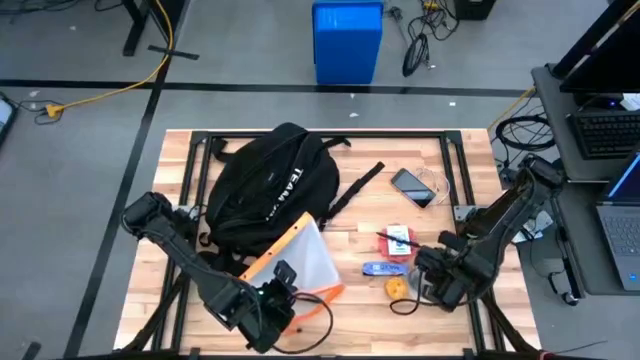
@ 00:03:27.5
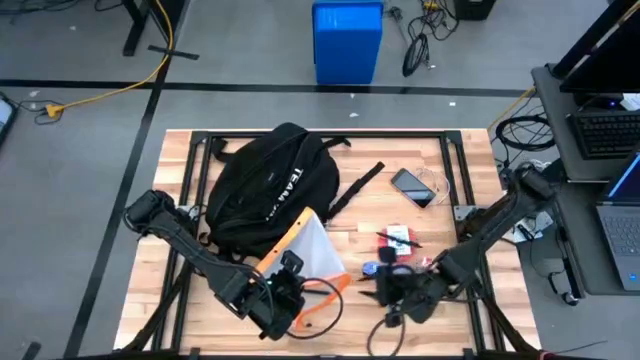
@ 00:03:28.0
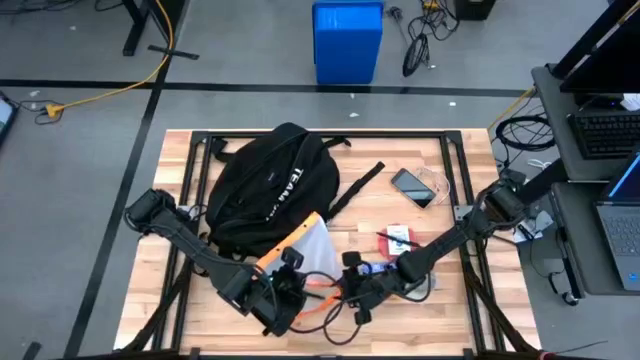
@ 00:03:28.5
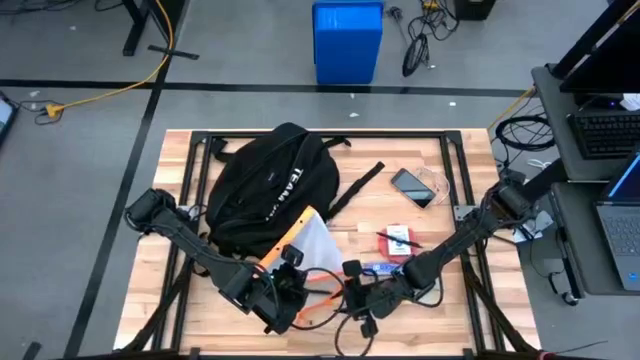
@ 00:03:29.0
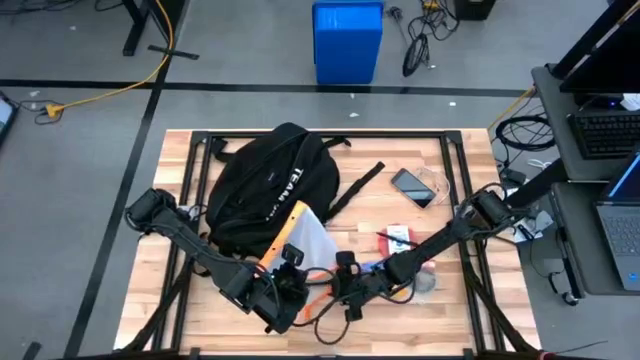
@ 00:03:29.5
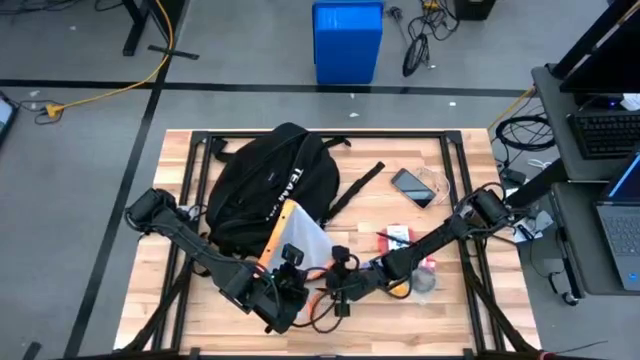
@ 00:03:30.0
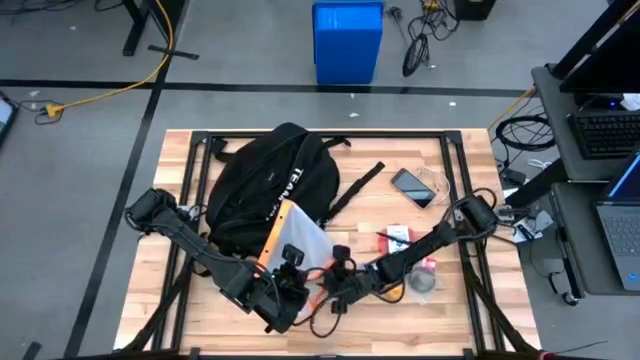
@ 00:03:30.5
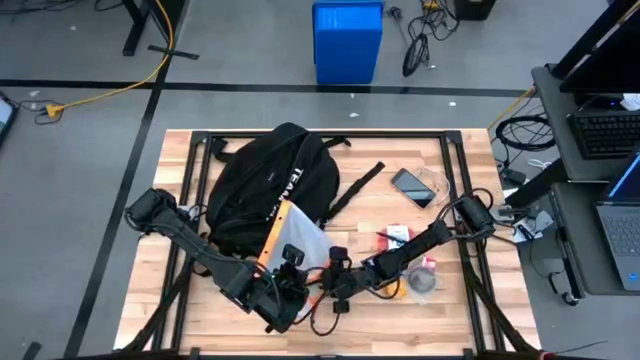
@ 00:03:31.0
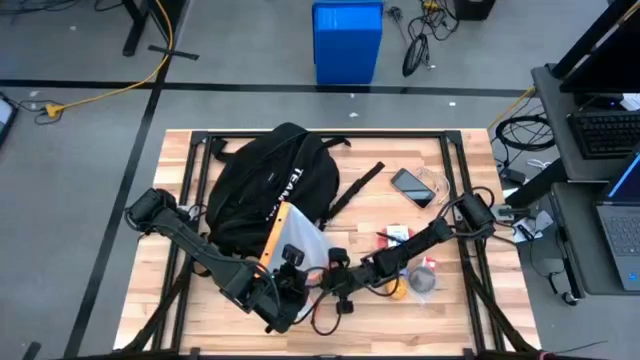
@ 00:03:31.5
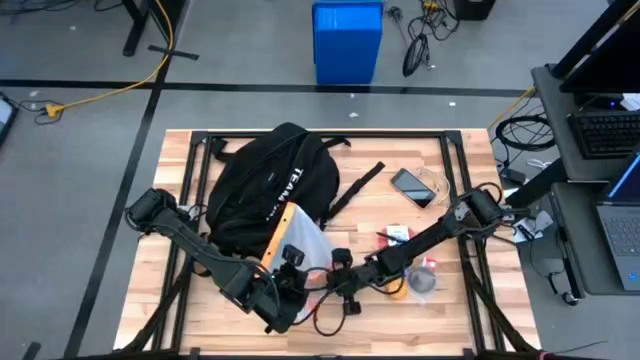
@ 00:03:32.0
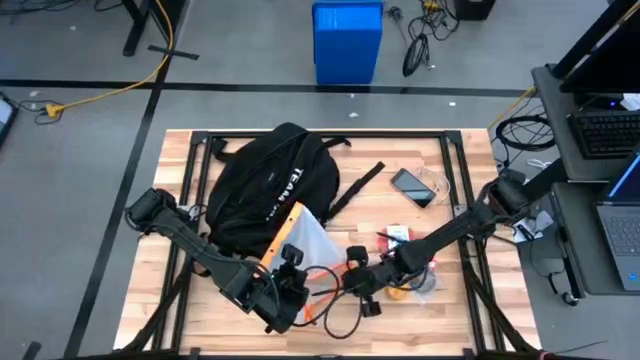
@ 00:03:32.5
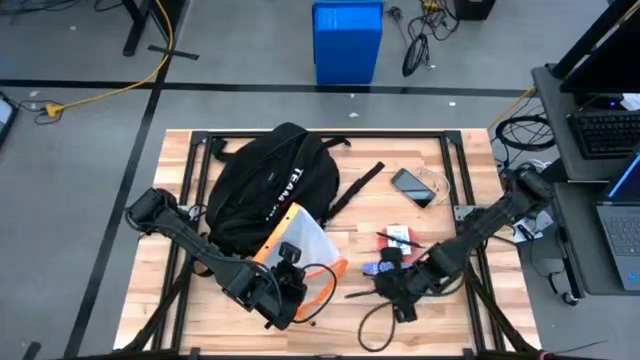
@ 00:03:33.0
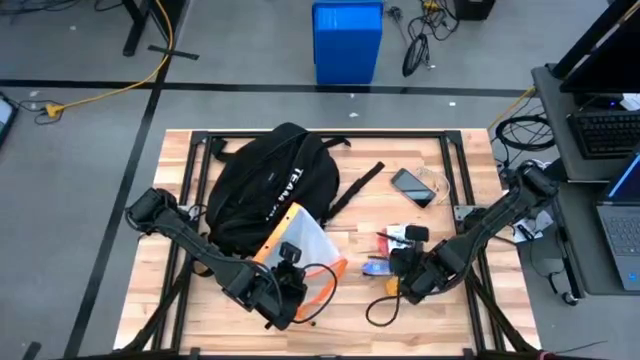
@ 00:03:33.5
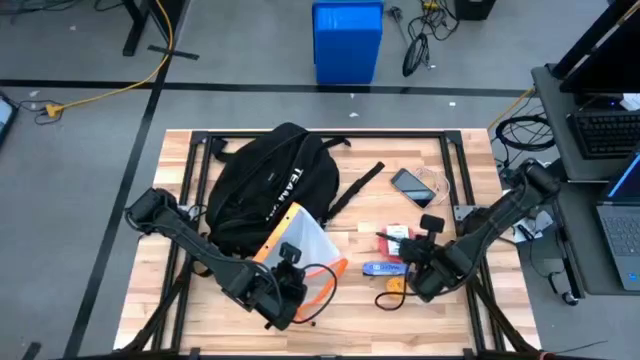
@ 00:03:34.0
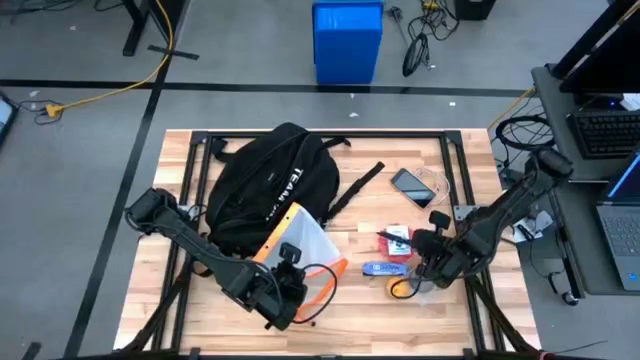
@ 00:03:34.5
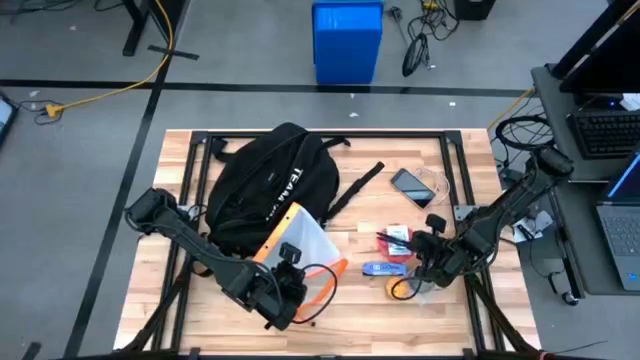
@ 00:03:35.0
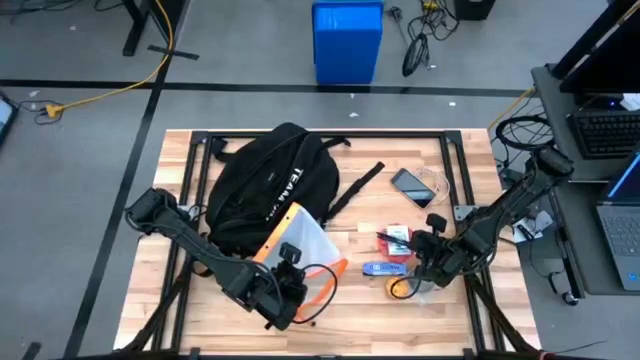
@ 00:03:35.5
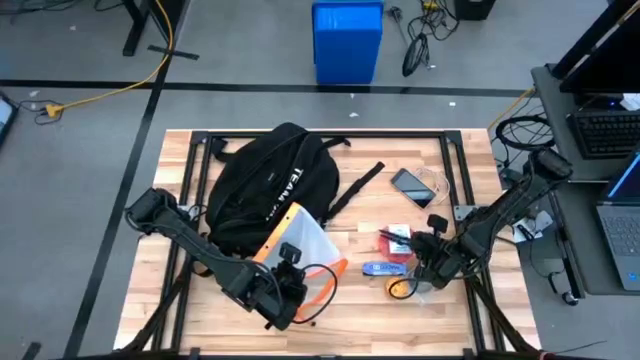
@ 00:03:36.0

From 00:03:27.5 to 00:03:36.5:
Task: Unpack backpack
Remove the black pen from the orange zip bag

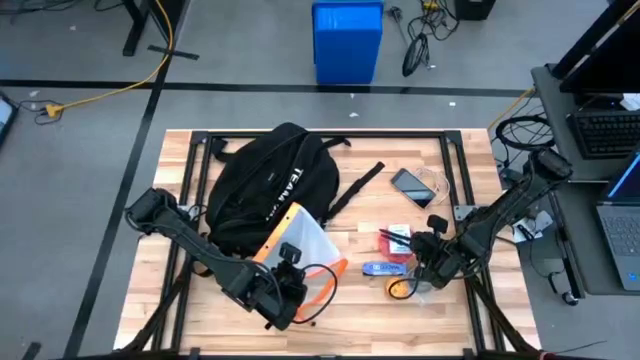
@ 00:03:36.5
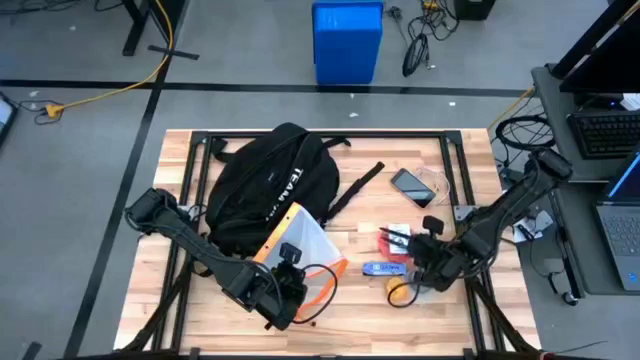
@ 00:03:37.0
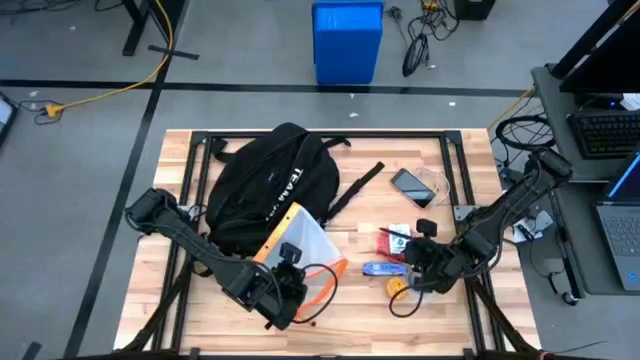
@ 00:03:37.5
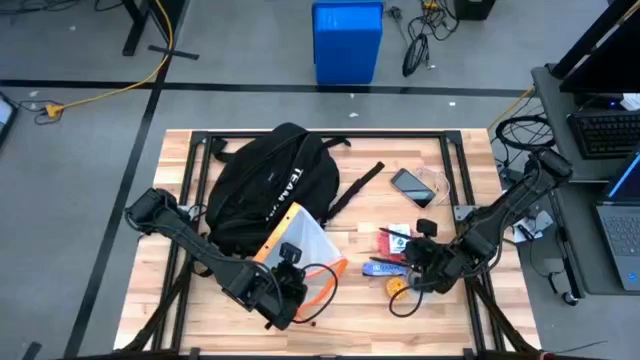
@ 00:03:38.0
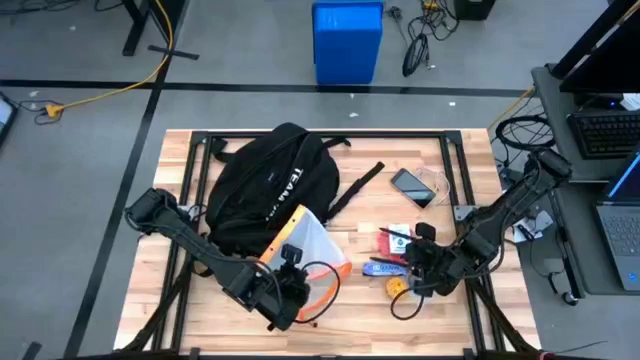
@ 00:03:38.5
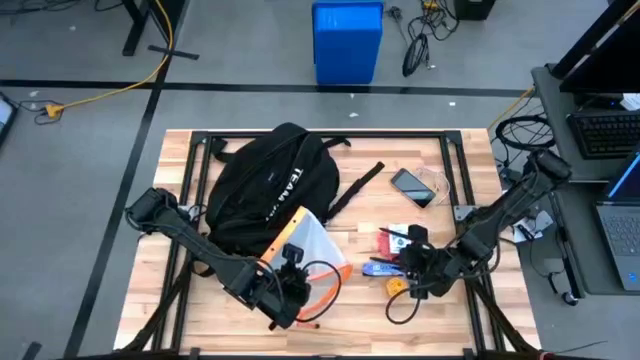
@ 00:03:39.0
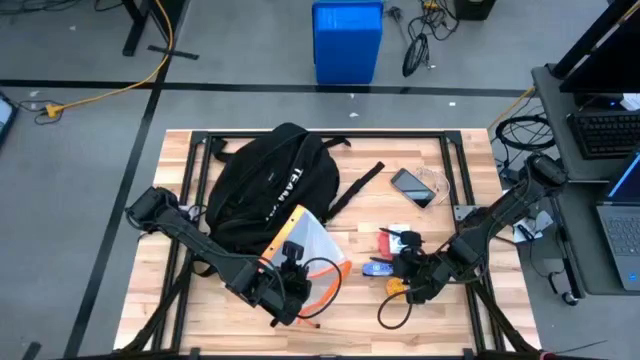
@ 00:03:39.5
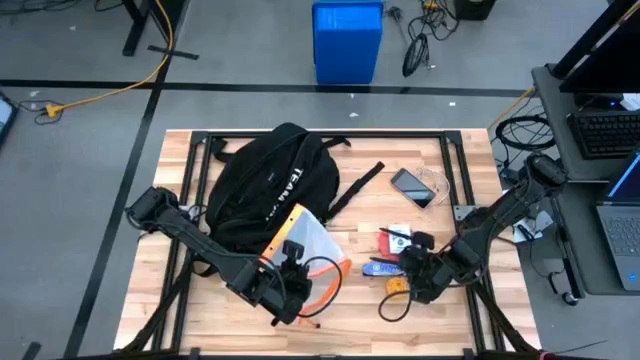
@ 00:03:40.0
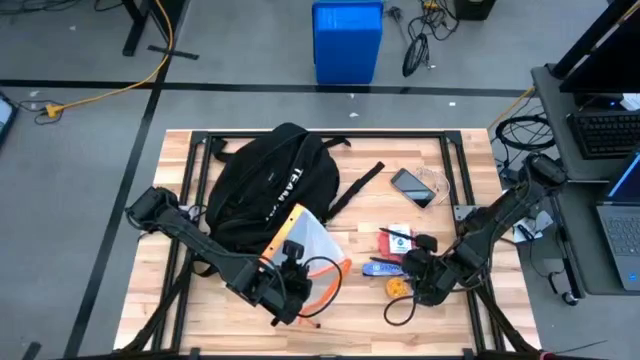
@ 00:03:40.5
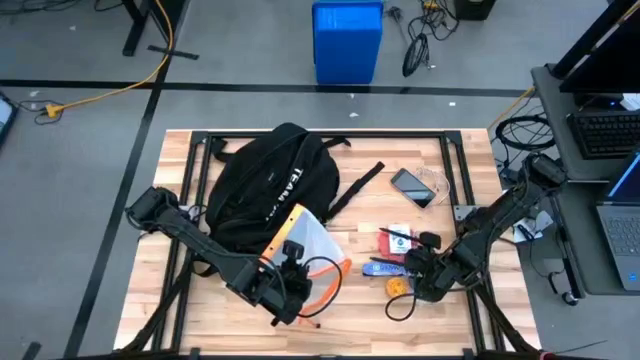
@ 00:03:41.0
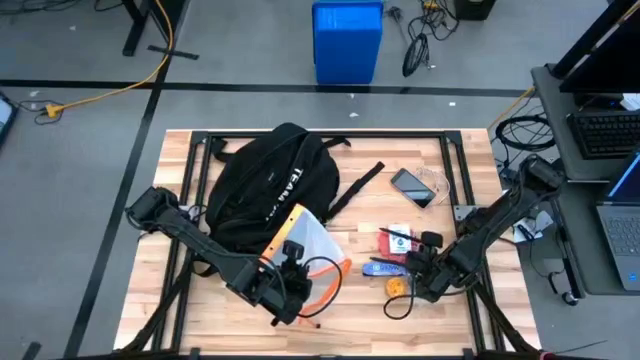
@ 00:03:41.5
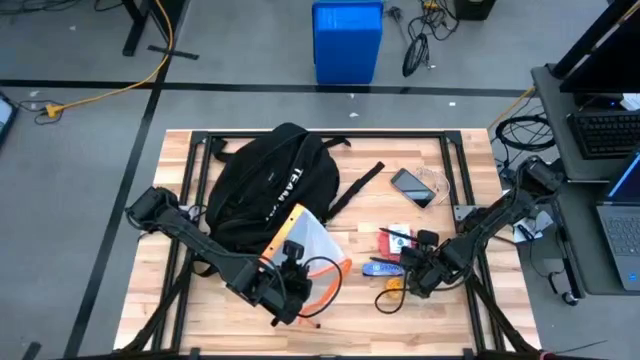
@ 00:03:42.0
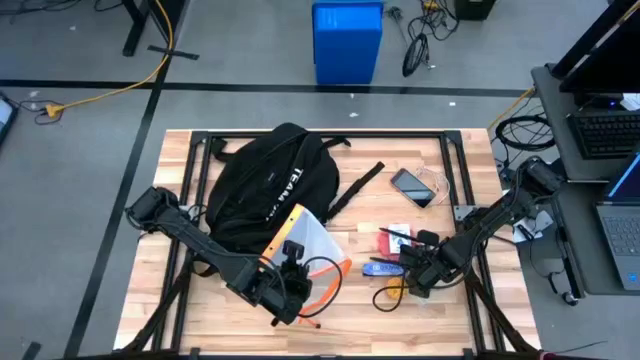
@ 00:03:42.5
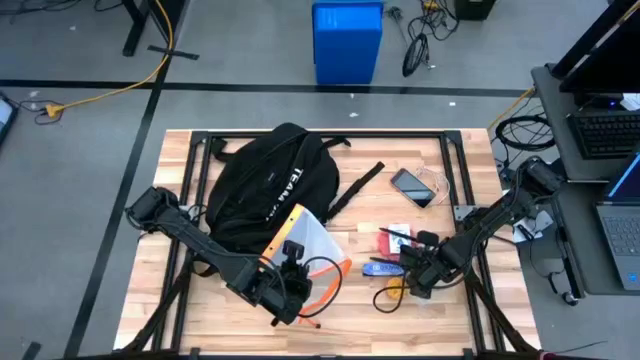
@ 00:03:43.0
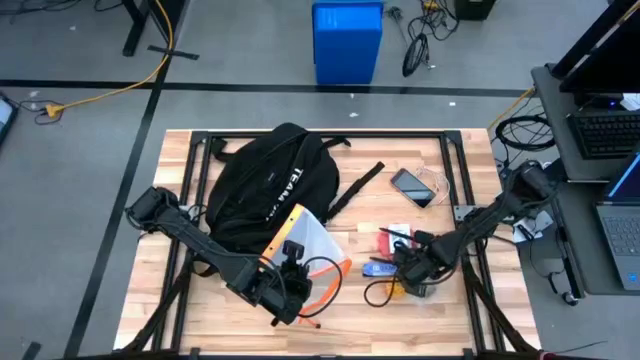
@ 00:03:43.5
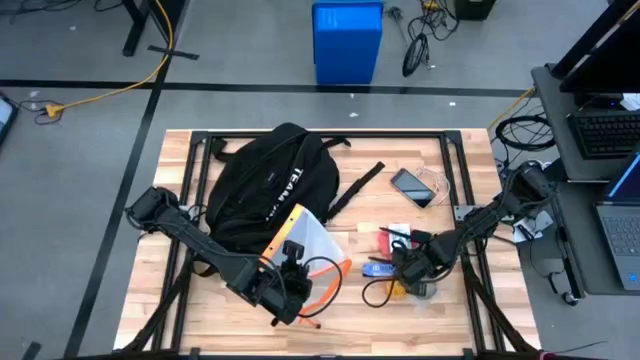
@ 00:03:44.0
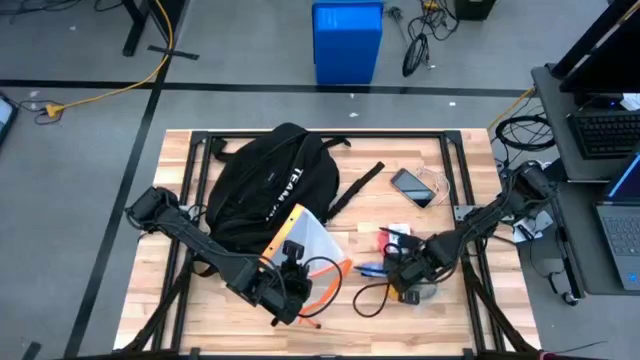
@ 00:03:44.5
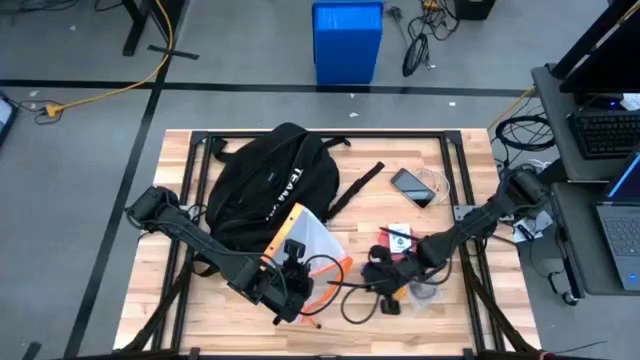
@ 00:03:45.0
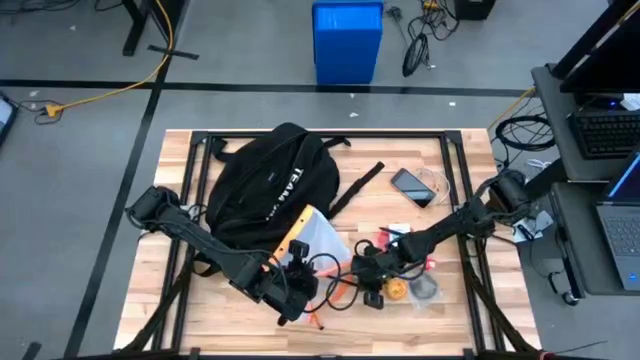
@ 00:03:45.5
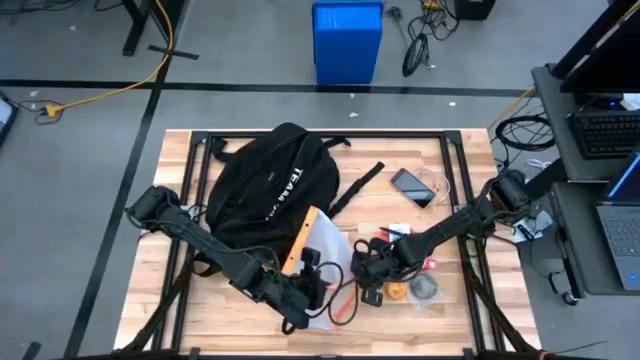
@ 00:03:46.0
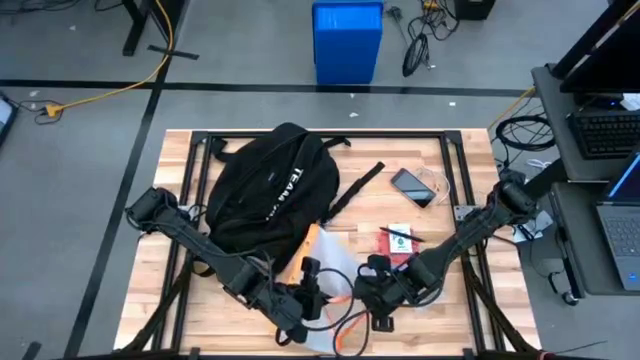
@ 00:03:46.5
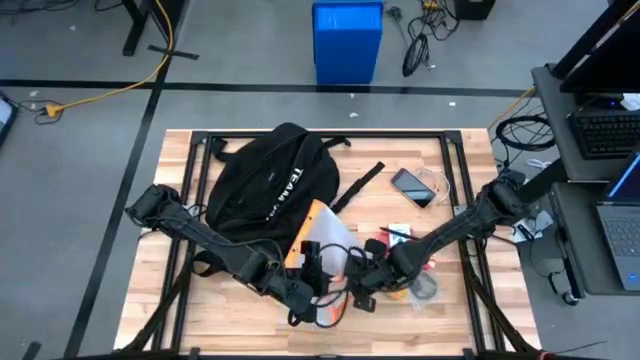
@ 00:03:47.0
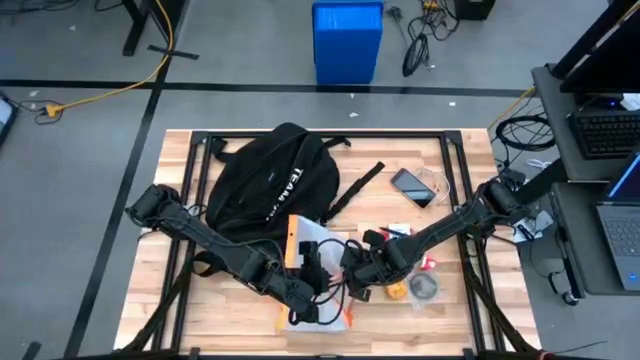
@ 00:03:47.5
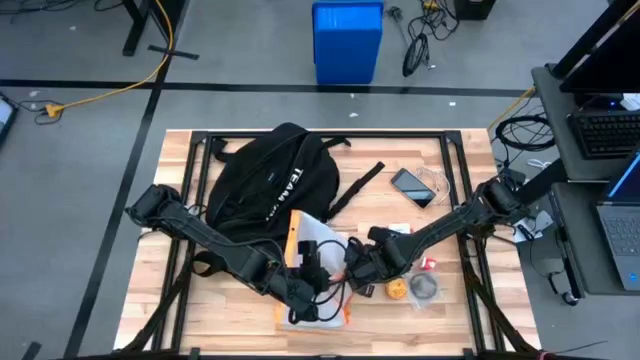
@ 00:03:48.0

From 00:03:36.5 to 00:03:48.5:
Put the left black pen into the orange zip bag
